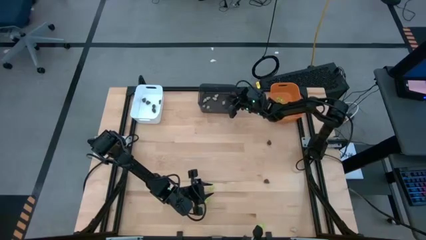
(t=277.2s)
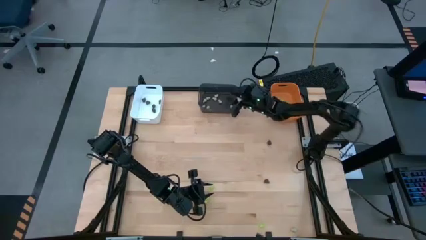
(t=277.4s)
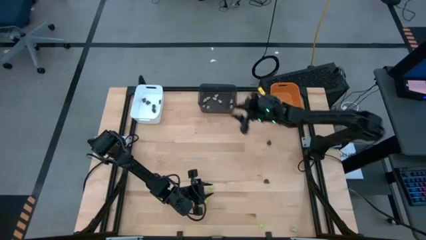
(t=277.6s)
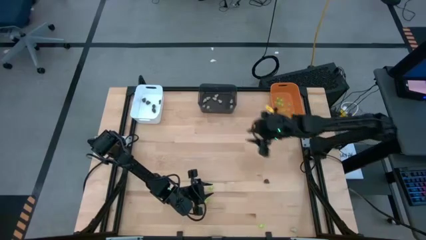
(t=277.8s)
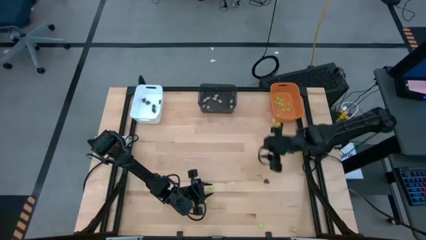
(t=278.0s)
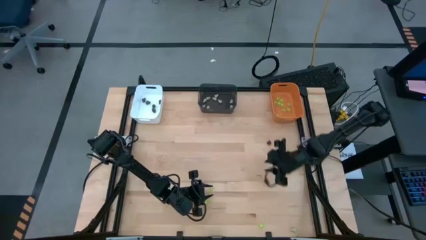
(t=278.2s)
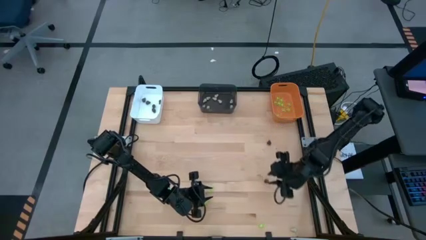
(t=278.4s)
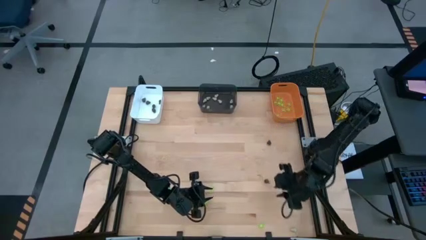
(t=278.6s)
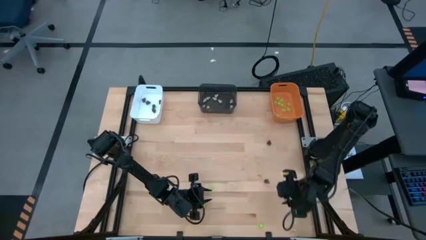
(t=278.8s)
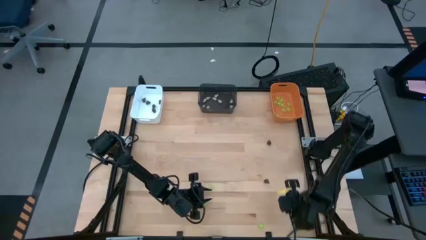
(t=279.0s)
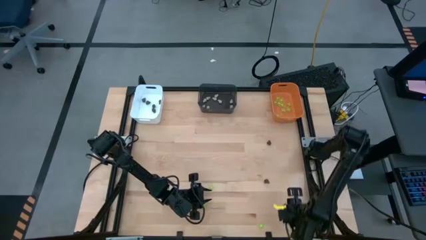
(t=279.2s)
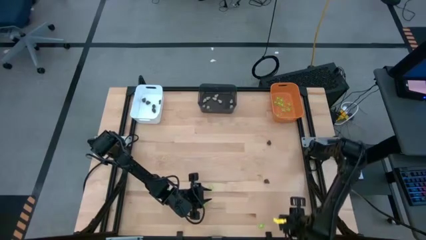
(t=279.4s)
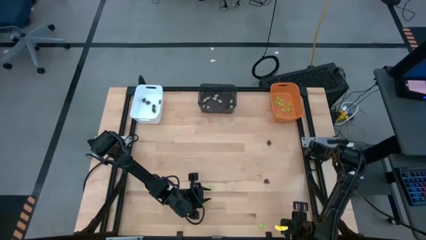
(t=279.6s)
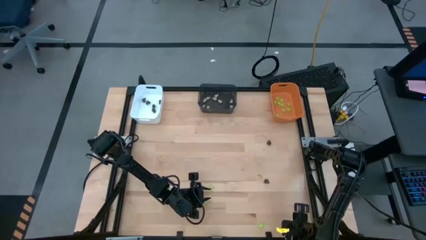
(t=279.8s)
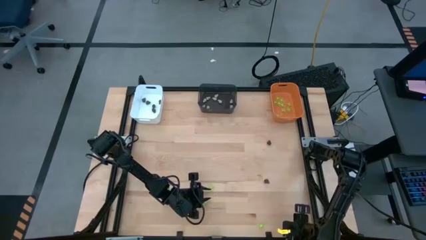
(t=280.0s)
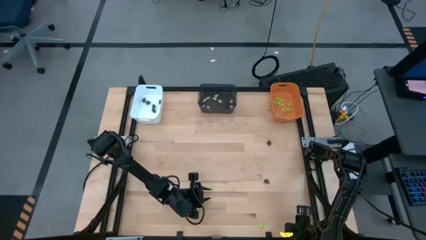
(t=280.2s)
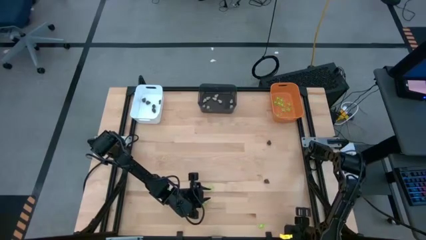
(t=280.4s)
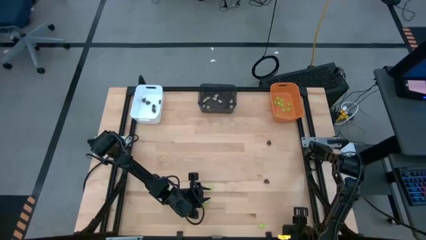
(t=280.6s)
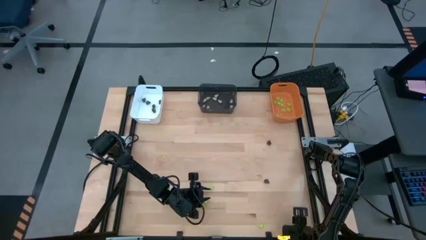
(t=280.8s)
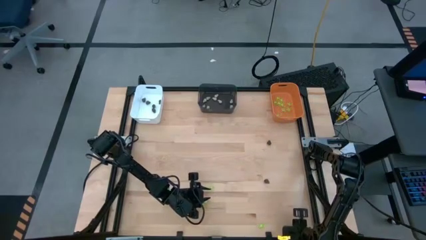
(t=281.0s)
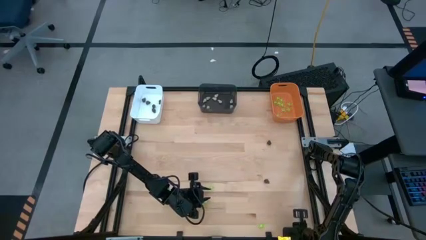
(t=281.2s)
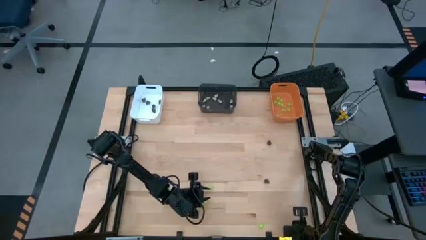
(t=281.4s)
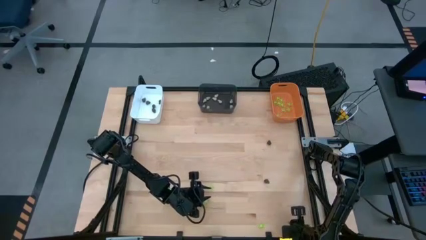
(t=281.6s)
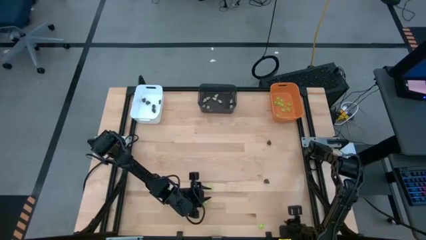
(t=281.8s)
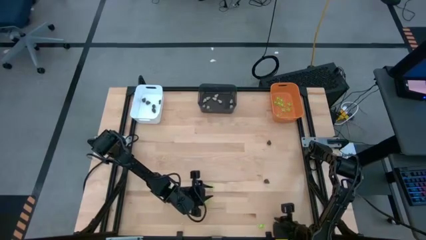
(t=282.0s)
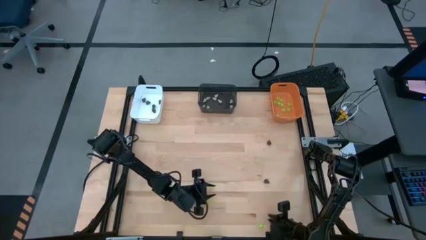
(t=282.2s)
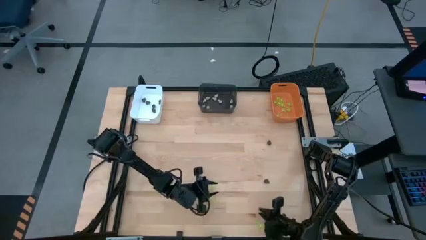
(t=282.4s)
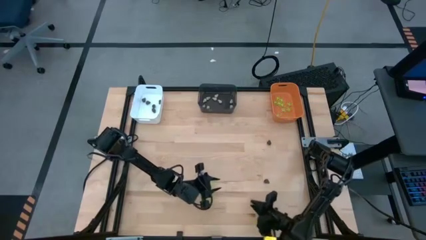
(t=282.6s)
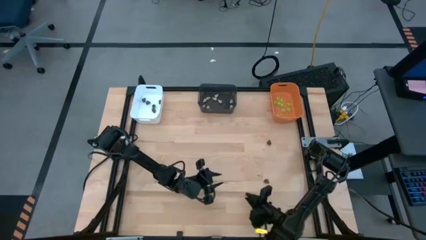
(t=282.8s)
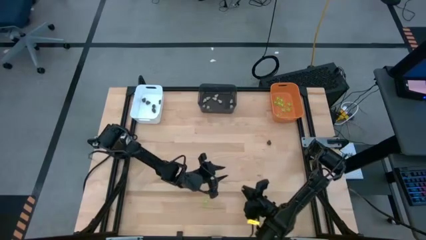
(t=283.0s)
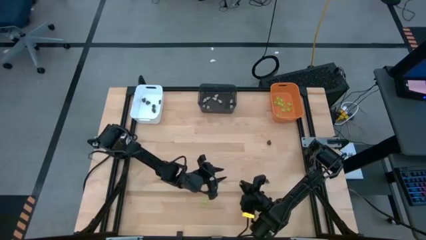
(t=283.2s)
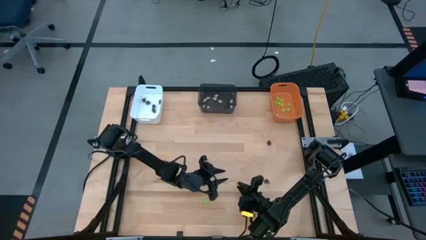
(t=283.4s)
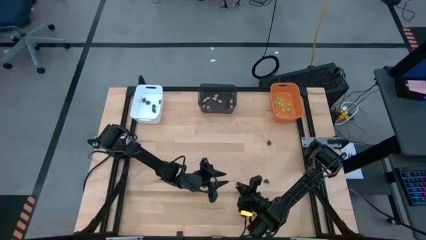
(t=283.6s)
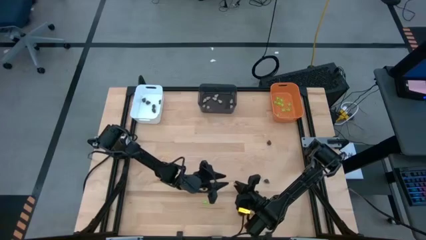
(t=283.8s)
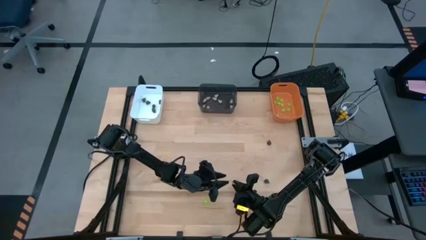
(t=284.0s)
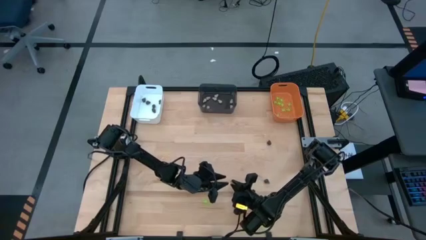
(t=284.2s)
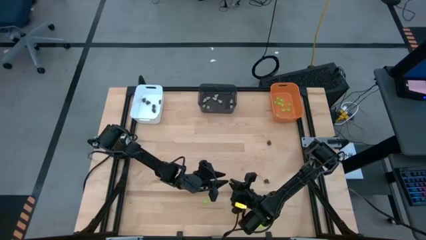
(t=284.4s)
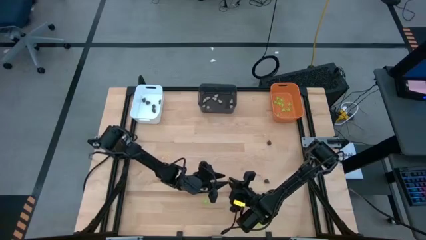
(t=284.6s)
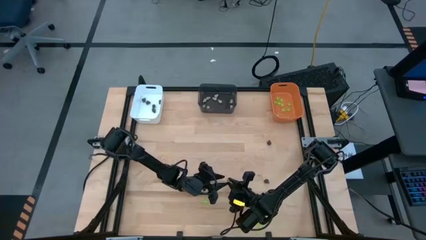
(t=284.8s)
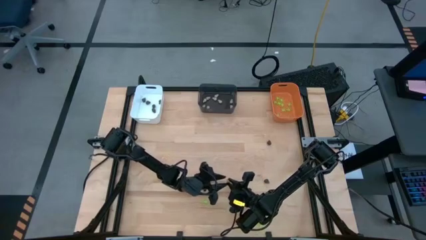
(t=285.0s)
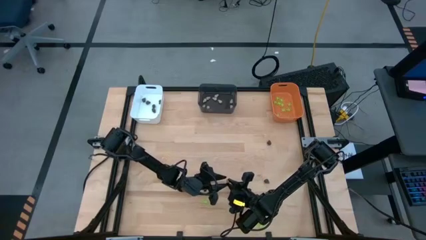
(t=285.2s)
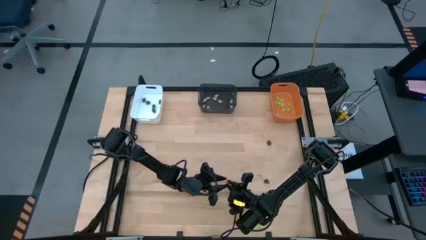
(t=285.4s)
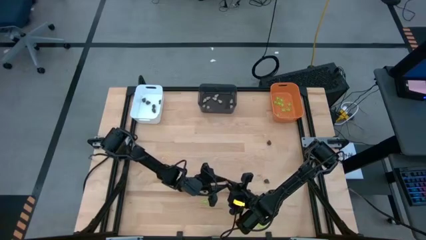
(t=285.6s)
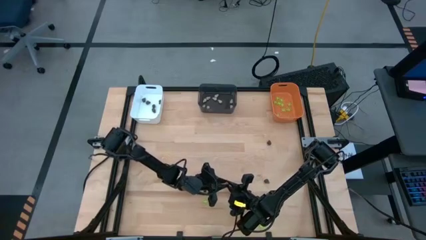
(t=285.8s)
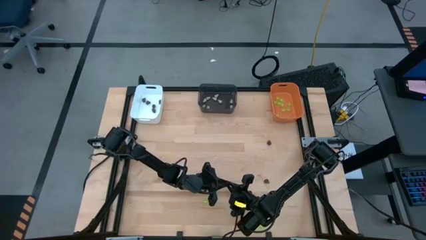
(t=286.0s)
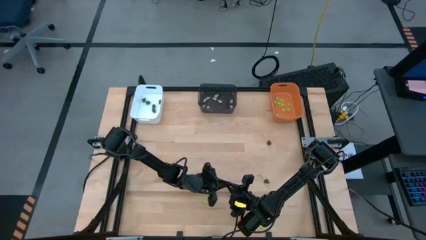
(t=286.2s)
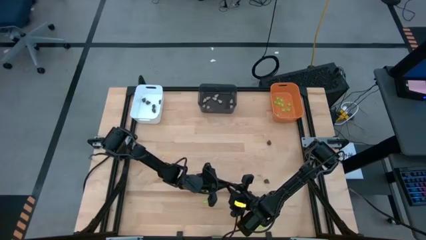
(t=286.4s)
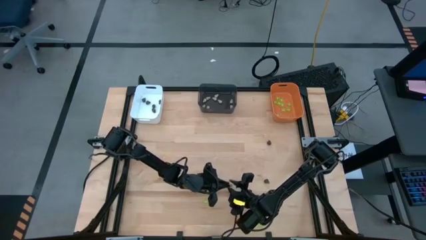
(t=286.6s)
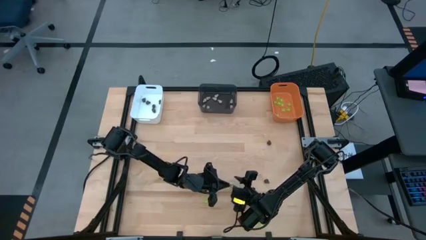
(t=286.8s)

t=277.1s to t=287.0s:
Task: Sort Halloween decoration
Put the white toy skull into the black bin

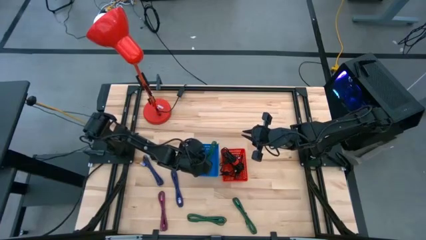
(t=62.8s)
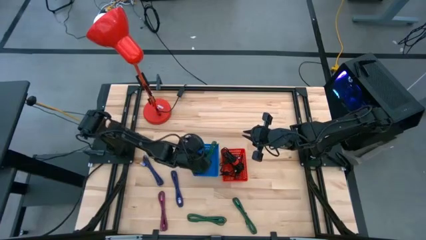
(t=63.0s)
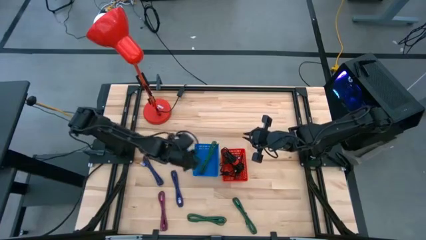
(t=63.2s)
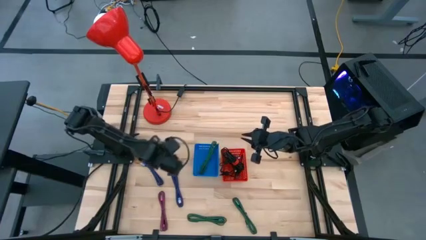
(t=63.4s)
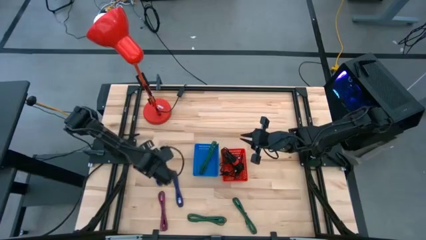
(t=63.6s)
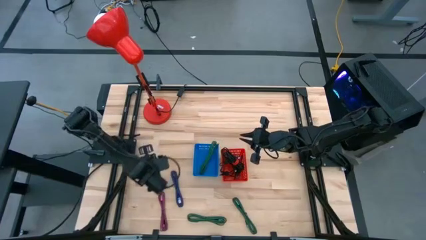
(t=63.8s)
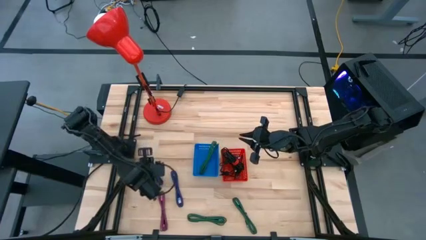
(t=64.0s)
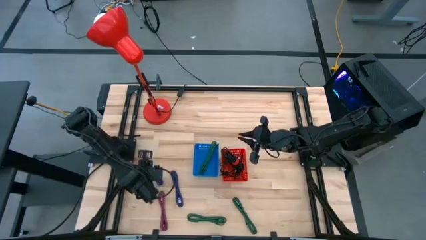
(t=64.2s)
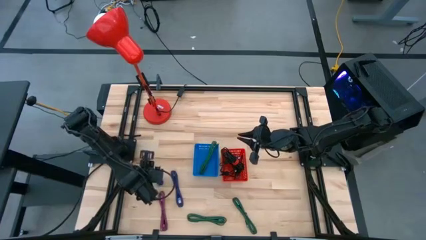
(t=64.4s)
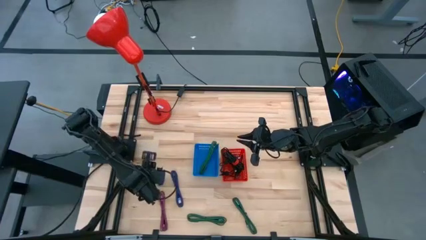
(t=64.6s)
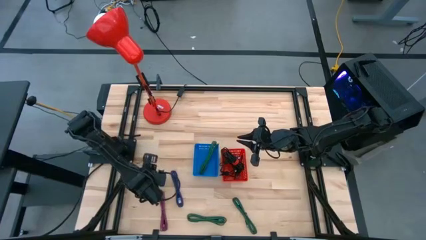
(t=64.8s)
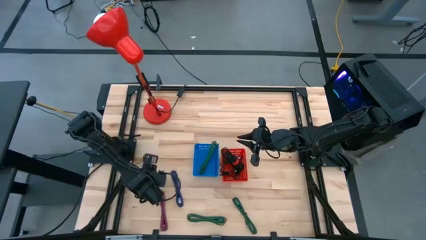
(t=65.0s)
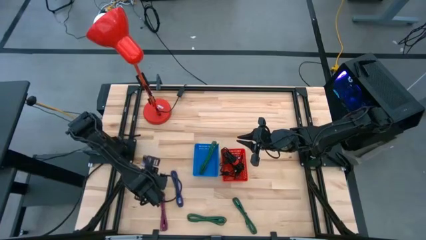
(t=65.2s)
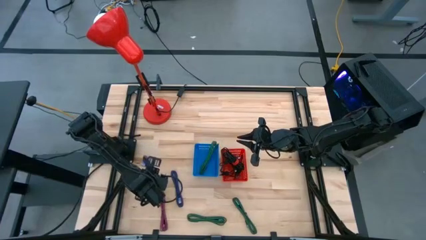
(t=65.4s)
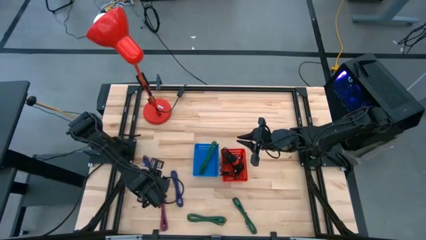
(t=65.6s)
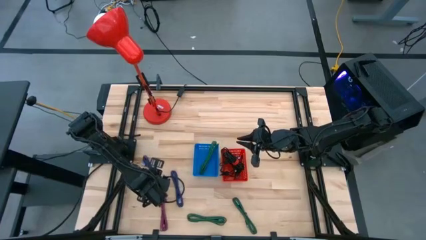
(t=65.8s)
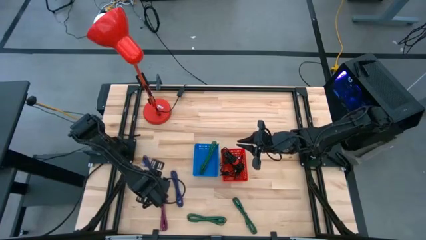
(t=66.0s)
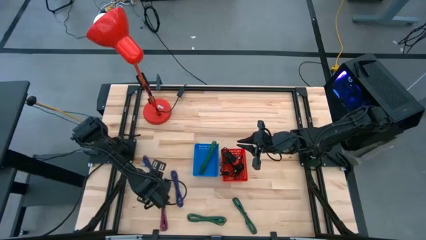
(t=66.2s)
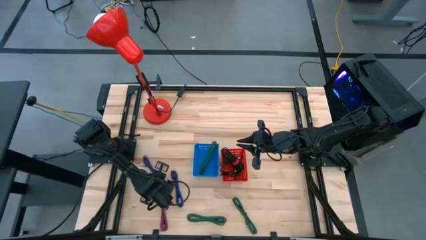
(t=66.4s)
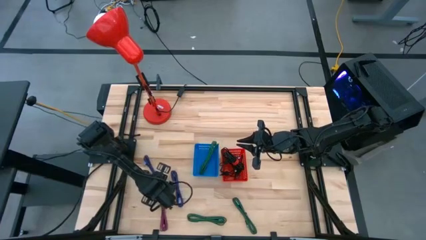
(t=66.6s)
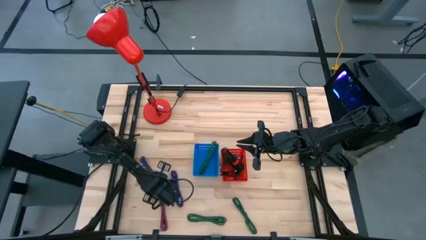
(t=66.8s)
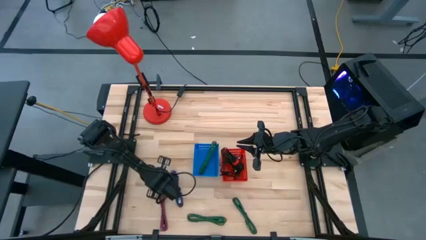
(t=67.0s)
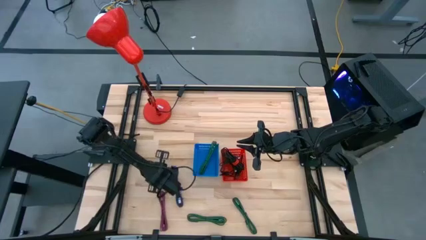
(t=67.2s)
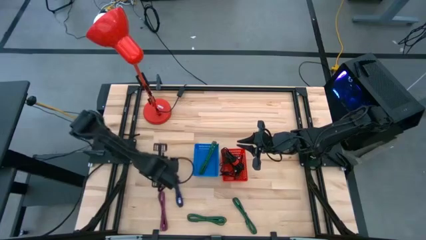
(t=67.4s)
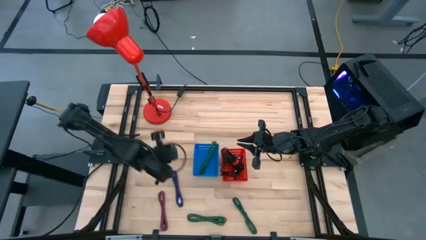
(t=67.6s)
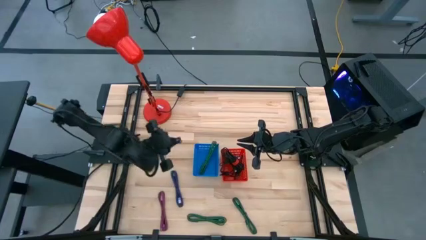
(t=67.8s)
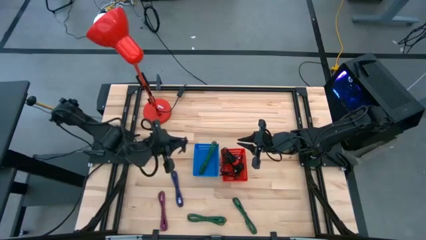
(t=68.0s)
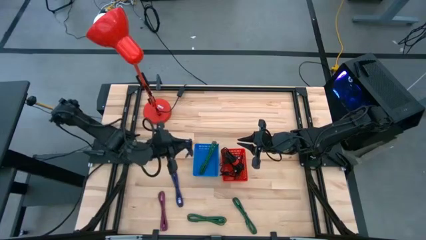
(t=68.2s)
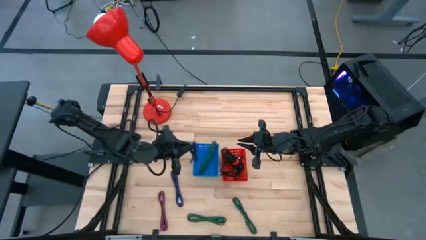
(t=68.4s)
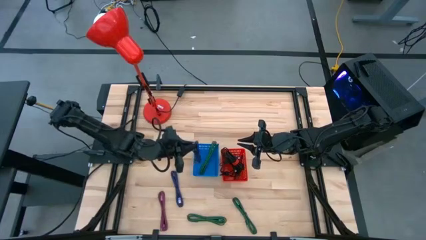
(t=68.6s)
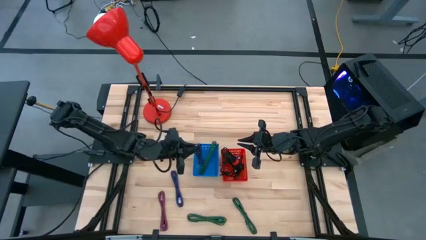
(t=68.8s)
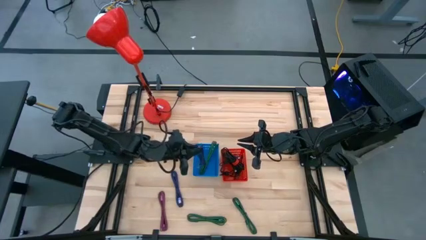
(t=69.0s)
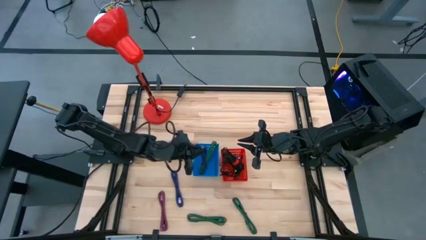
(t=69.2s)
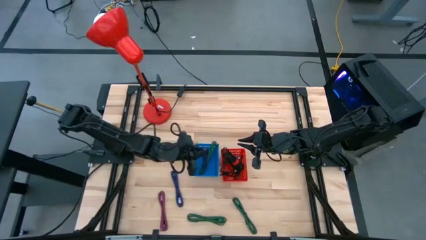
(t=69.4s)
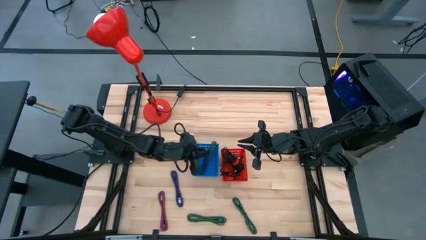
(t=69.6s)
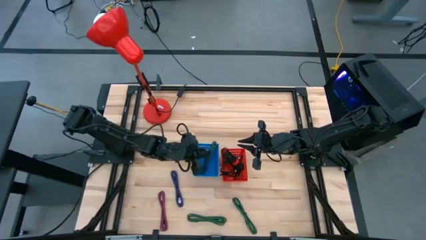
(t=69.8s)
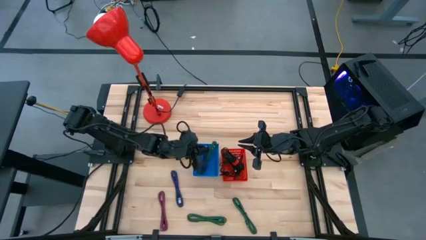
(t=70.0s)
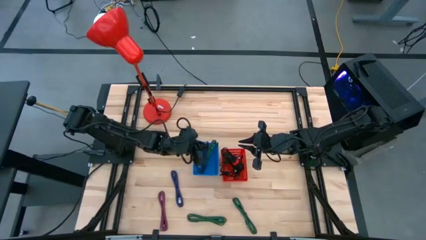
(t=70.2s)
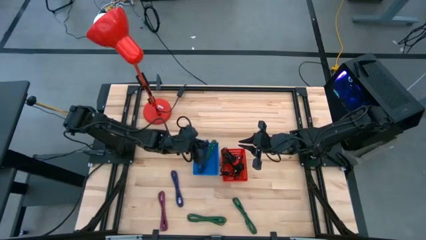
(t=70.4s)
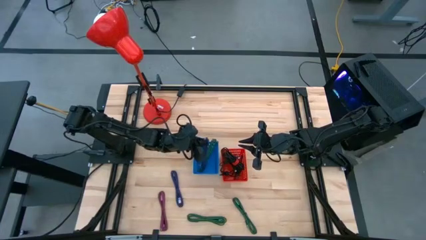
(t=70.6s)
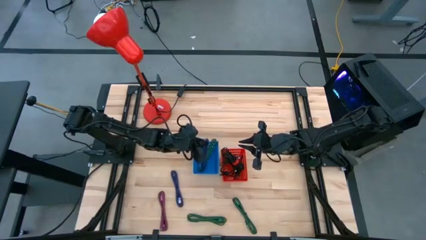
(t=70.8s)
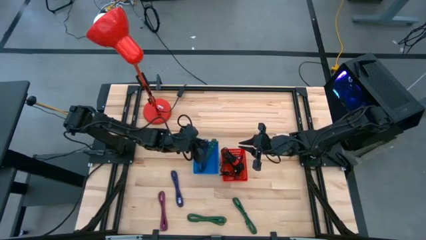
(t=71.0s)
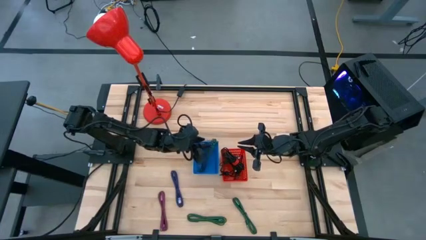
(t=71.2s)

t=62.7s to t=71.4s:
Task: Pick & Place USB Port
Put the purple charger cable into the blue bin
